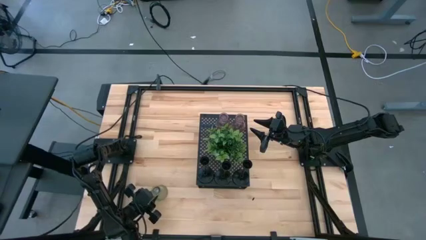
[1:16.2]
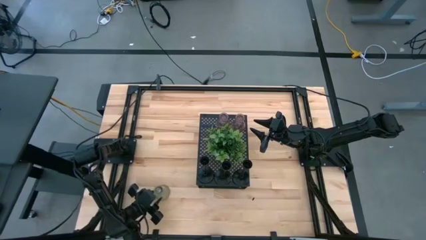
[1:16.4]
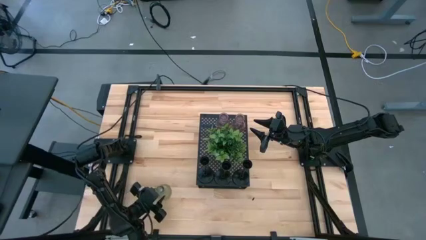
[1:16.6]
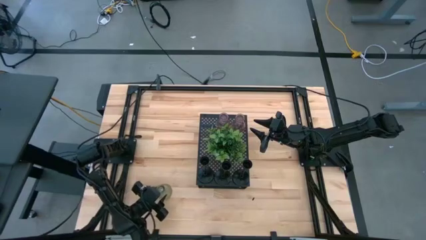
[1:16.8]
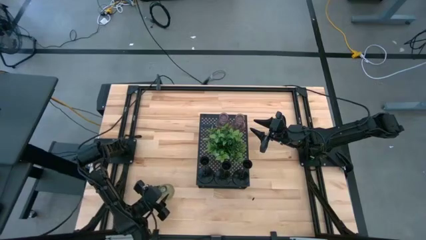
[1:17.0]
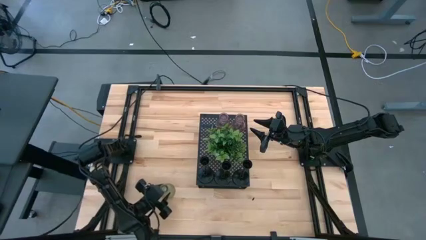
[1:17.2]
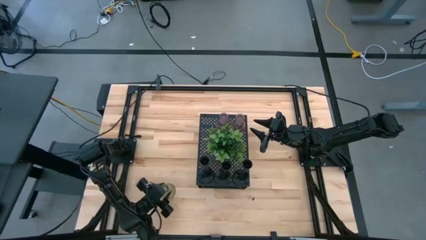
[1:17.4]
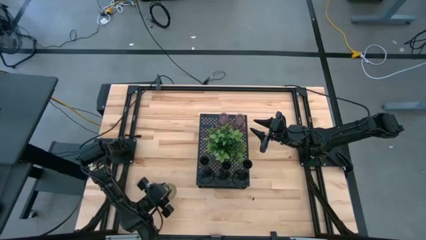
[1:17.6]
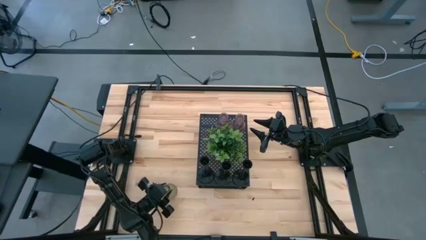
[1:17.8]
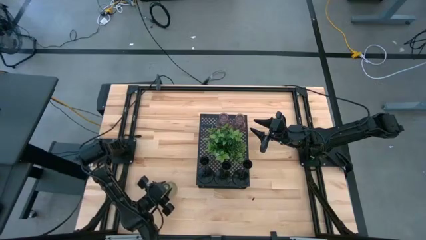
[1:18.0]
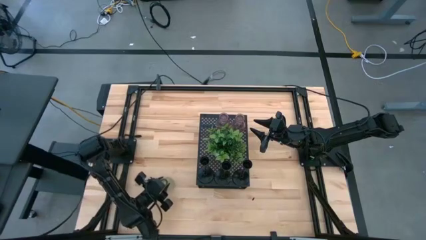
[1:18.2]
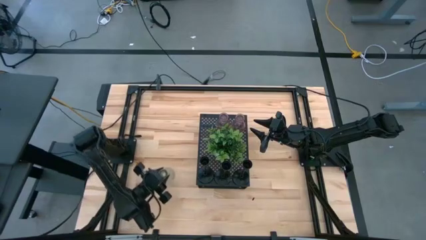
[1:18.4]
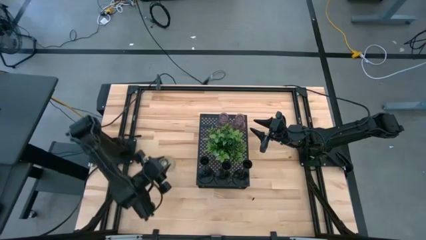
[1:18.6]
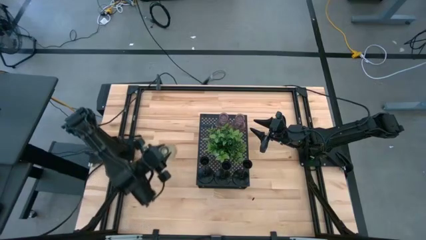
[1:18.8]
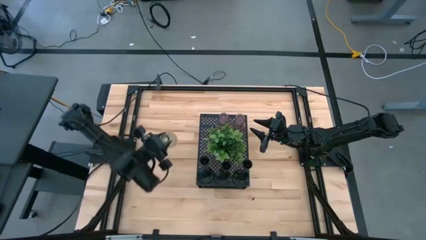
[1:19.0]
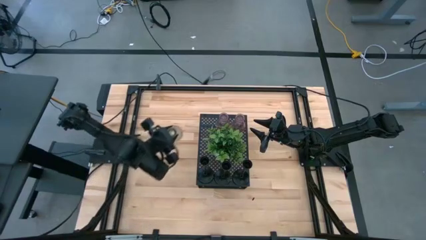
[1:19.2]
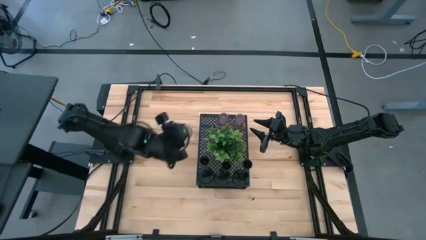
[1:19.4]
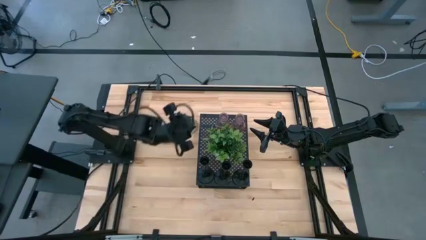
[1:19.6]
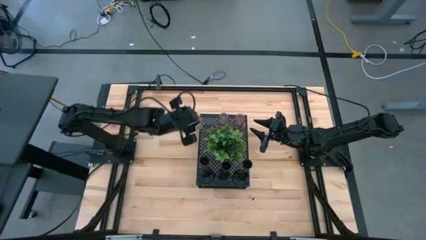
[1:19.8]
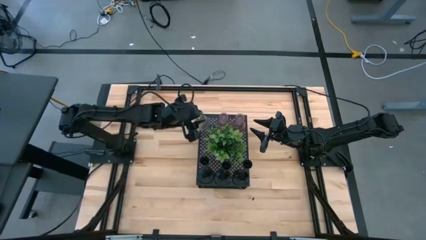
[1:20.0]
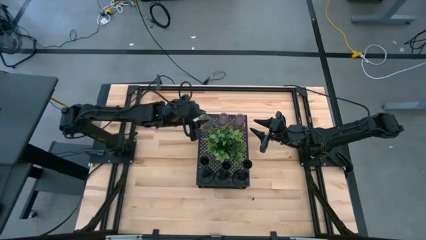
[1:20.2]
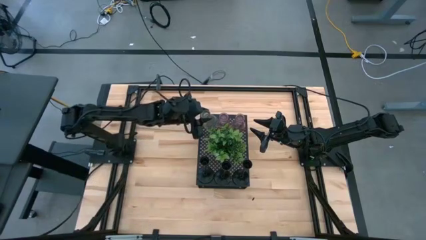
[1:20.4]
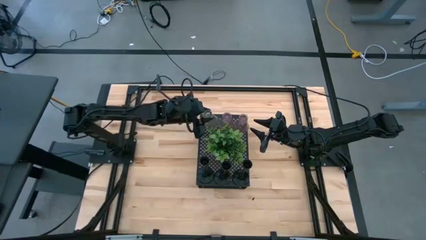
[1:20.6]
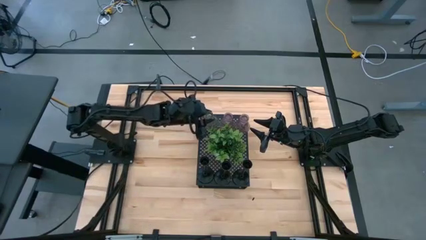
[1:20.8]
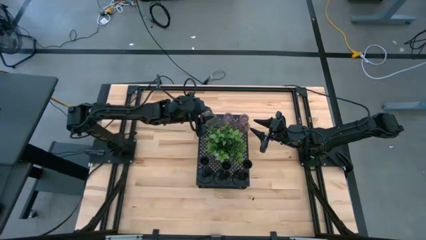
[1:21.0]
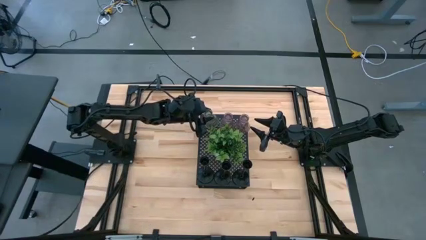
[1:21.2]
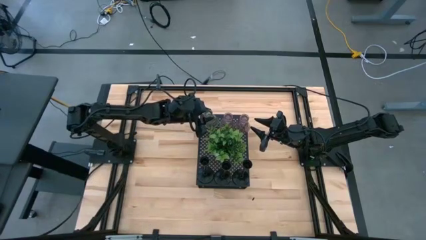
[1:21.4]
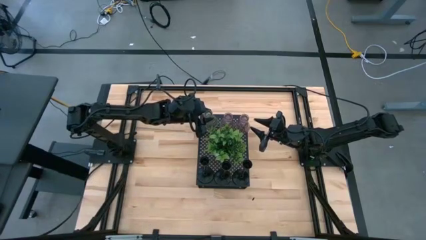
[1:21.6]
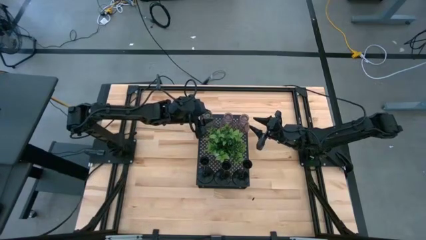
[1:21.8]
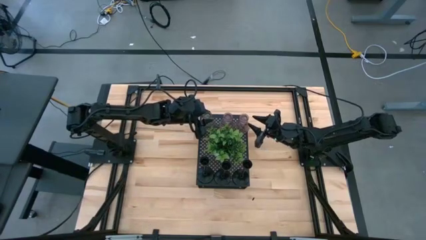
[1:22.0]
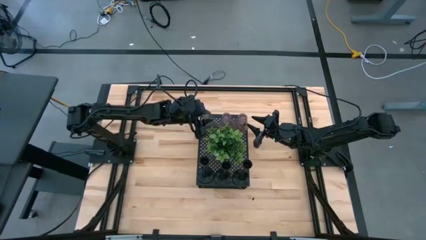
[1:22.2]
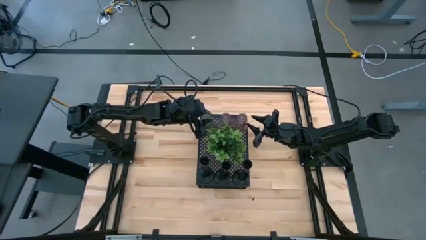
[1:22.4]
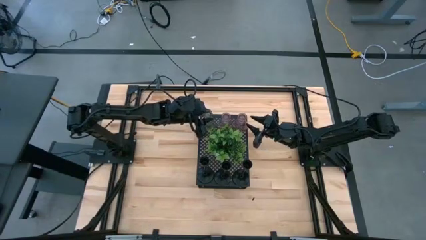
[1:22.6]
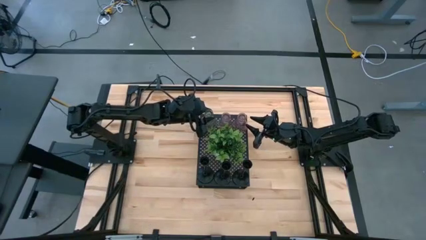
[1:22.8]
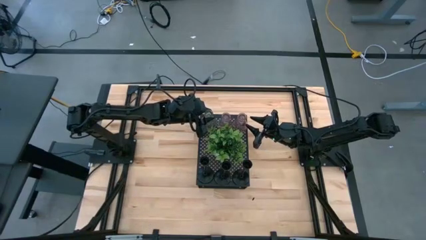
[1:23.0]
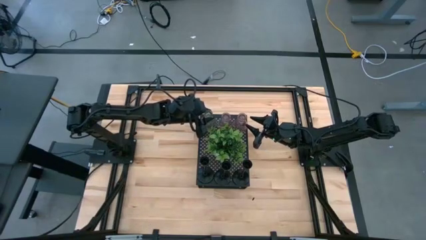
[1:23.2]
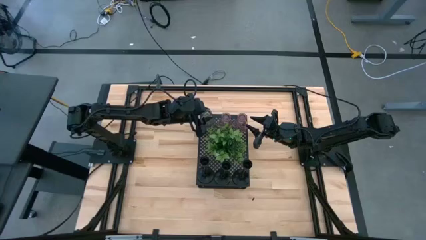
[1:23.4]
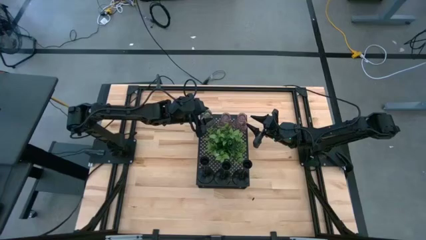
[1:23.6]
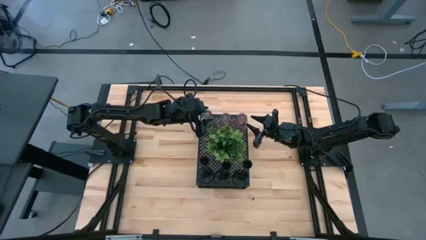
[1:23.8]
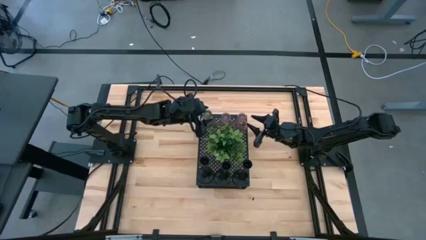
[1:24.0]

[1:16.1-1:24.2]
Task: Pick & Place candle stick holders
Align the green glass candle holder with the other glass candle holders on the shelf

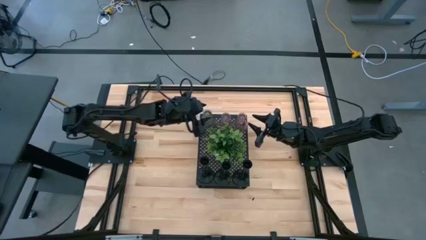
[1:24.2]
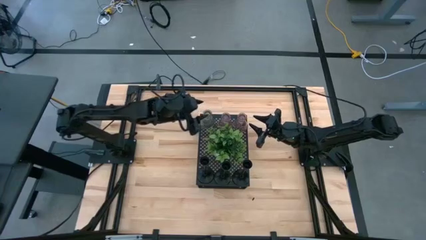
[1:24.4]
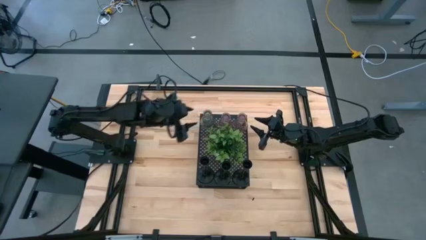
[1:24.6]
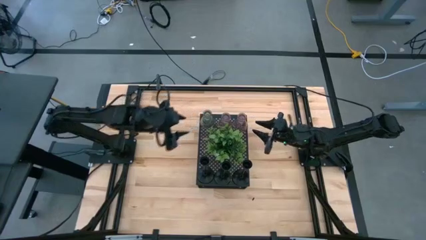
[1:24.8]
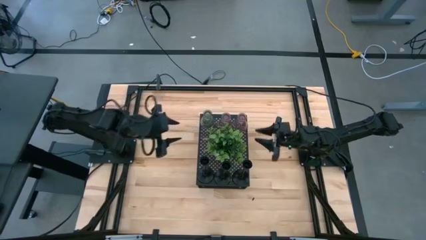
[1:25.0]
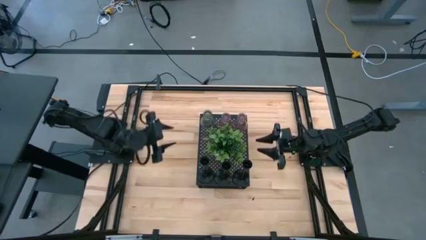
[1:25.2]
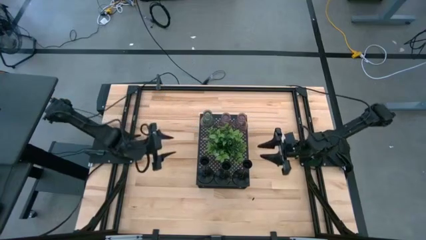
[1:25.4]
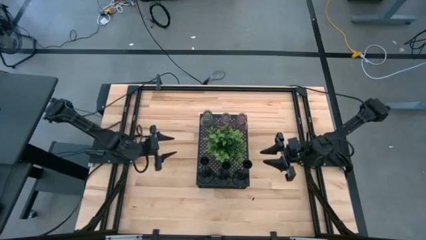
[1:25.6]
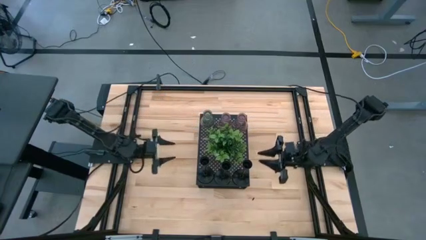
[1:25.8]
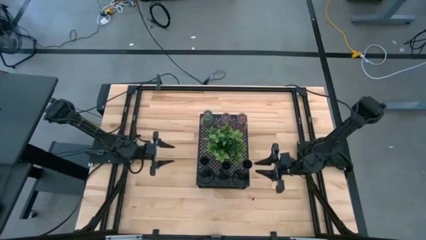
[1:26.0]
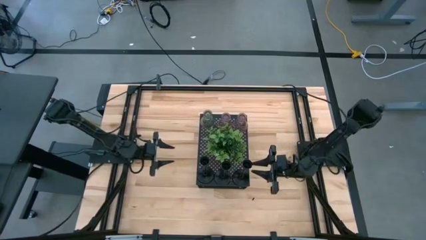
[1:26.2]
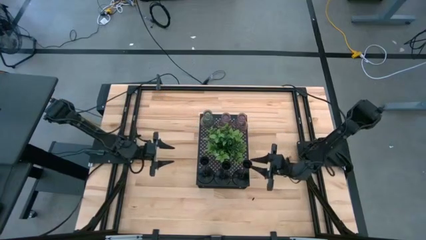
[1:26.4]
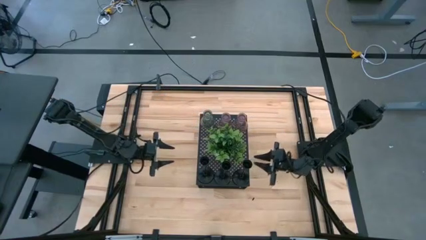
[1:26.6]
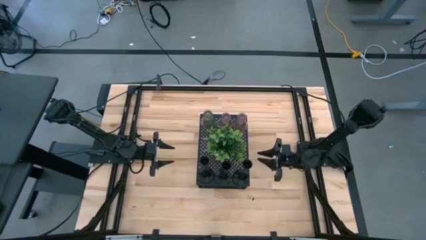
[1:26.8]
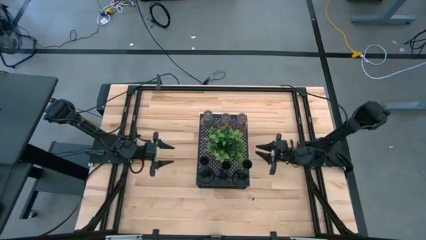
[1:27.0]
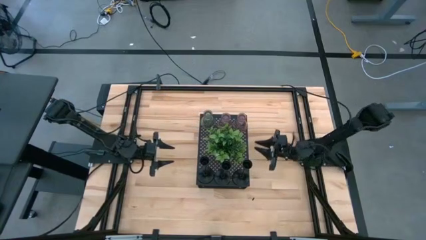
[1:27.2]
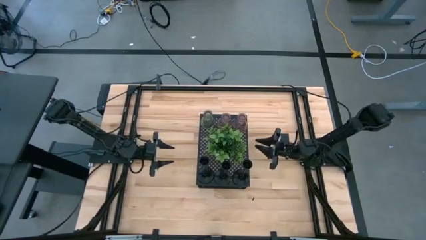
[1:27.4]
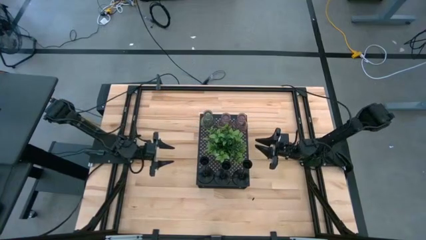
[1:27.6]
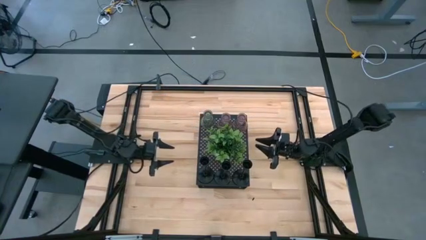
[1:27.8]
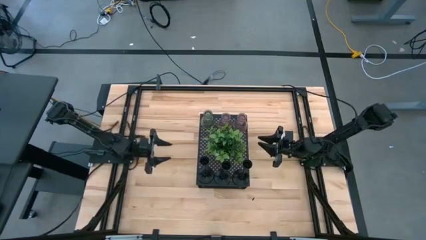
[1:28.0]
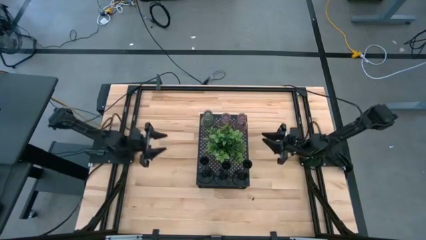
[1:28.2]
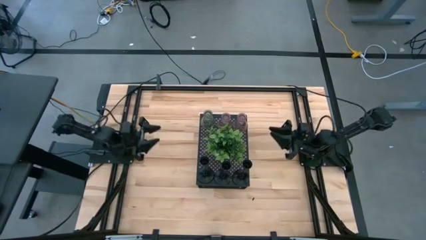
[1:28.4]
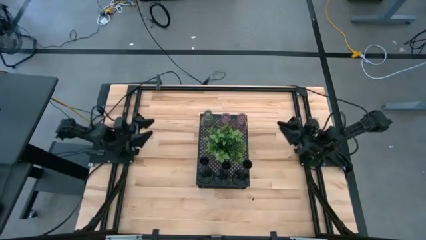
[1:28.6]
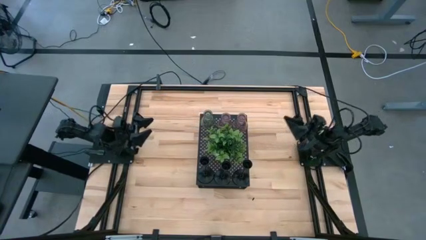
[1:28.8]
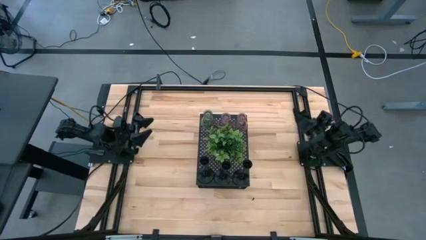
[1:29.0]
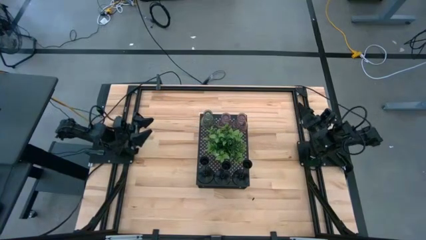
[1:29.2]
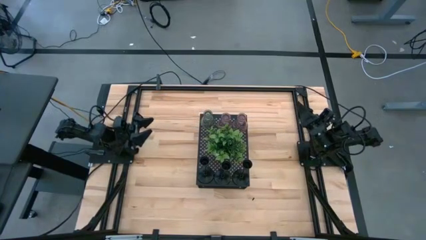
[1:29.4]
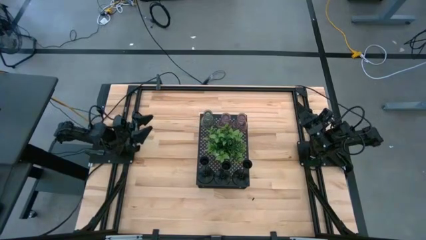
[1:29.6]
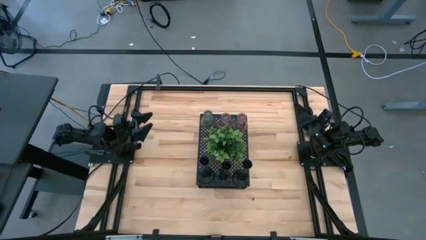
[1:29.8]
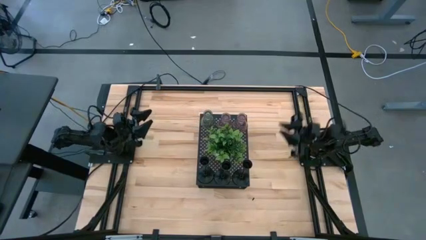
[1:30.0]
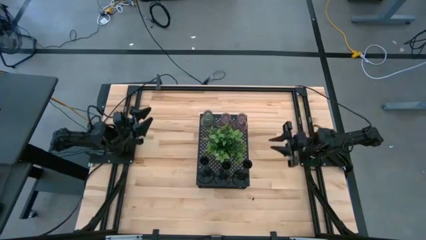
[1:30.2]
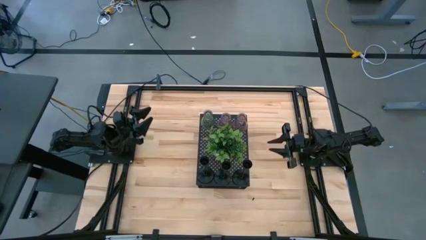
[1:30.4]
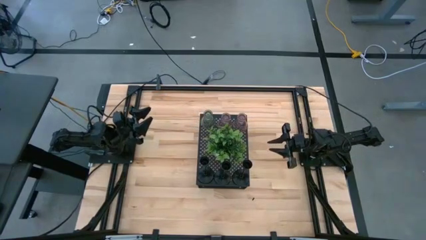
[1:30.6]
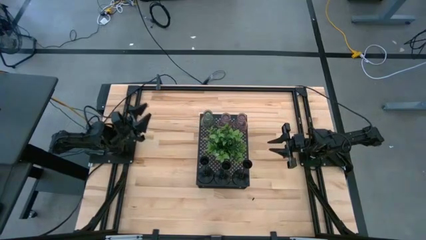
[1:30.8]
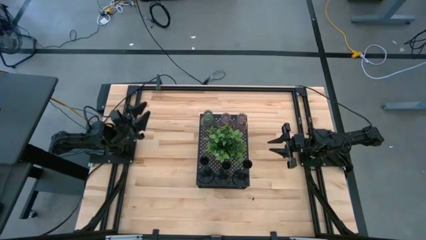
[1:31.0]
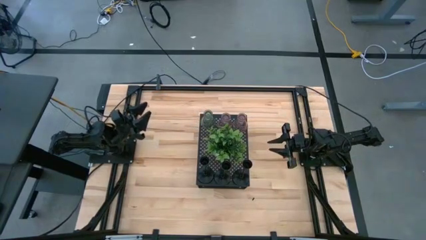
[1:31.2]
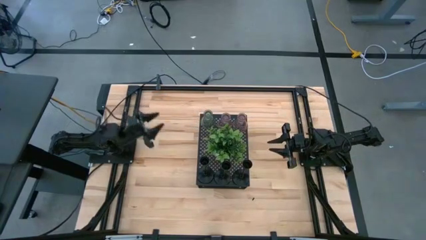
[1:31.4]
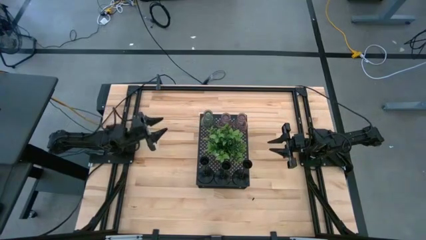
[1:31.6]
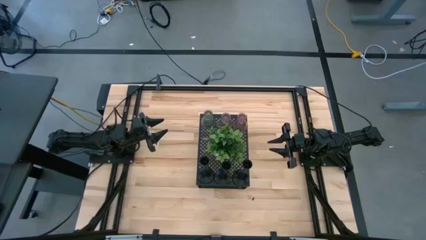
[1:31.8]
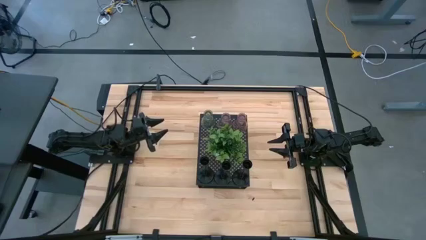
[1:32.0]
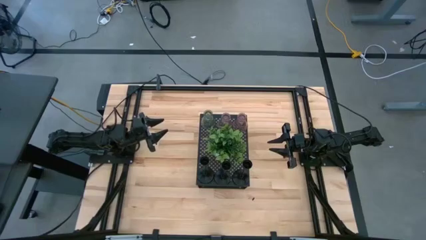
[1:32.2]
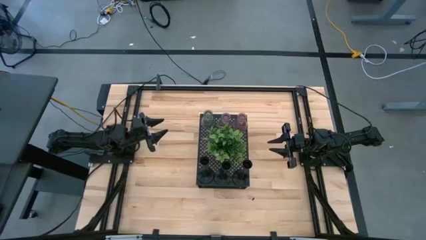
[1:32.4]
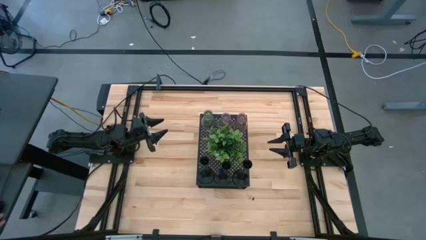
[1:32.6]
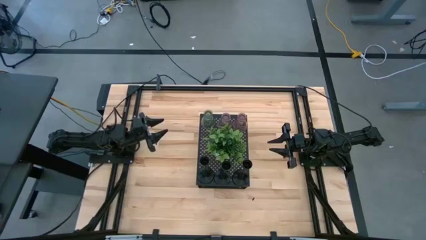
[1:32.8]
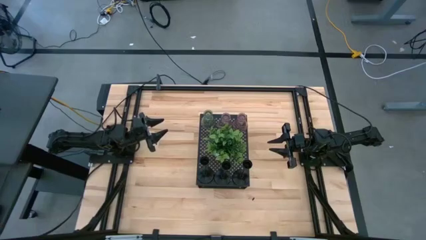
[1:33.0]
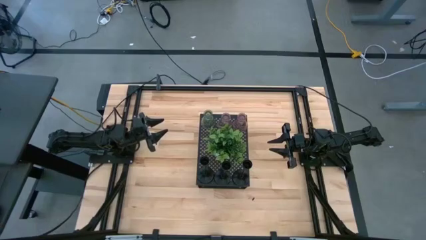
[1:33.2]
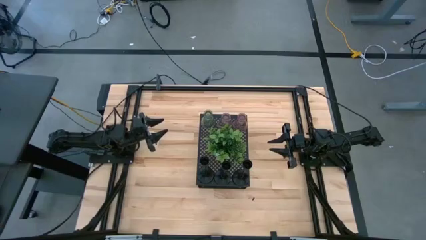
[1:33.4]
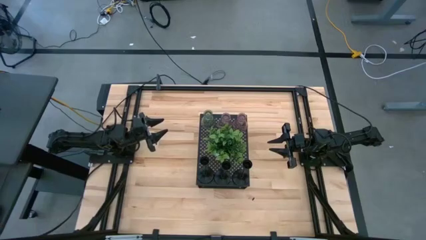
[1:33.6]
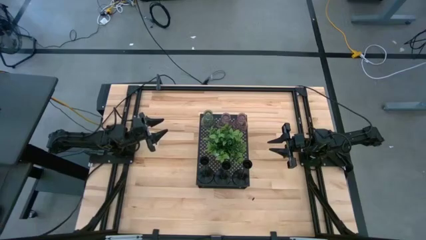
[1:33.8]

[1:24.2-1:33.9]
Return to Home Position
